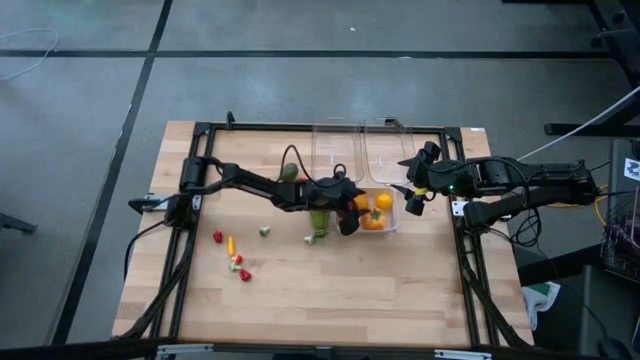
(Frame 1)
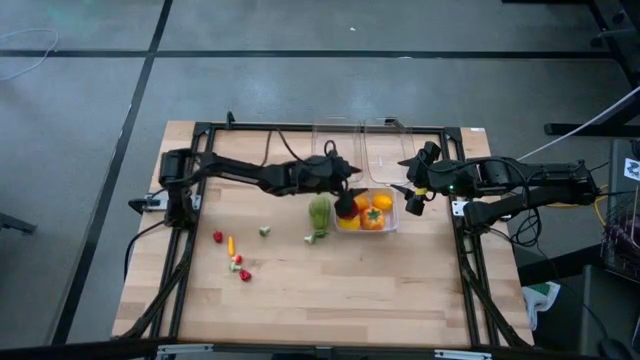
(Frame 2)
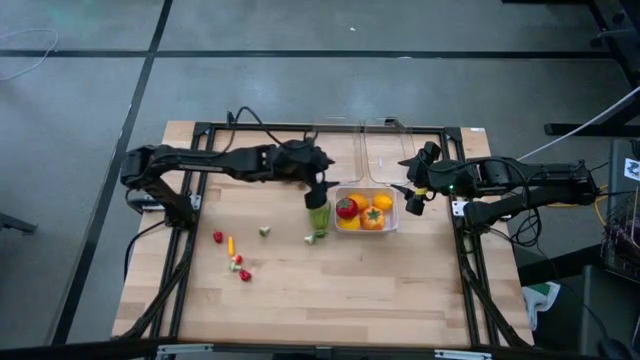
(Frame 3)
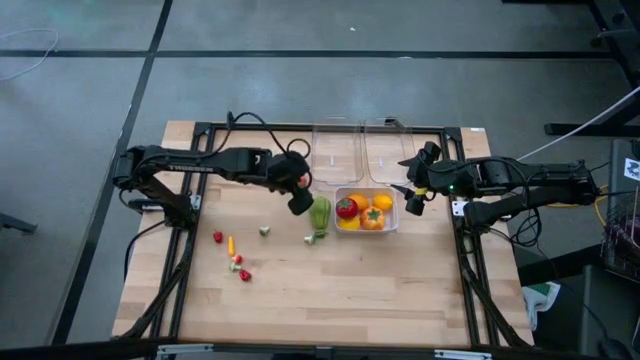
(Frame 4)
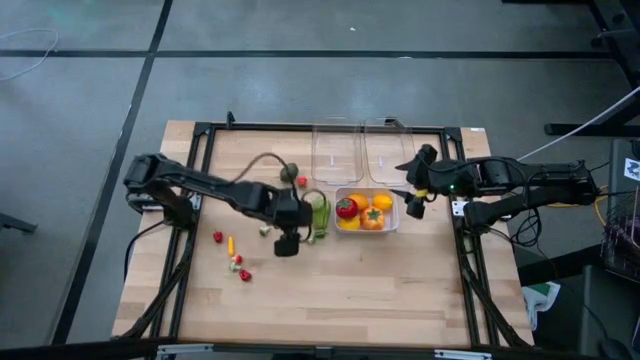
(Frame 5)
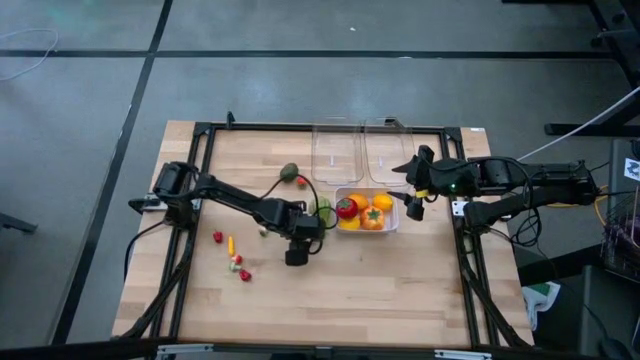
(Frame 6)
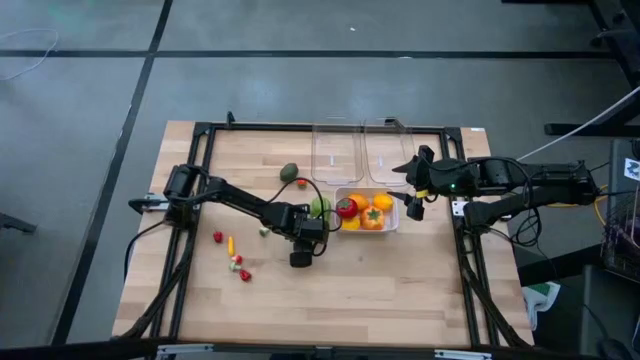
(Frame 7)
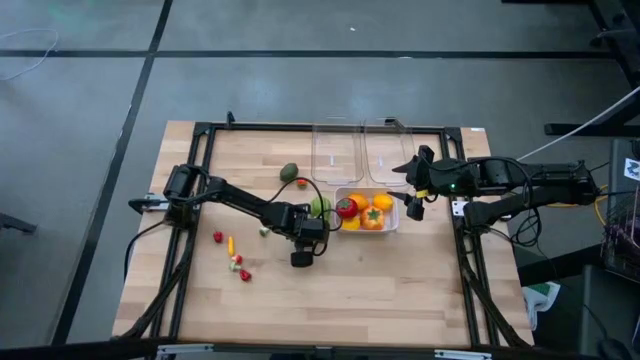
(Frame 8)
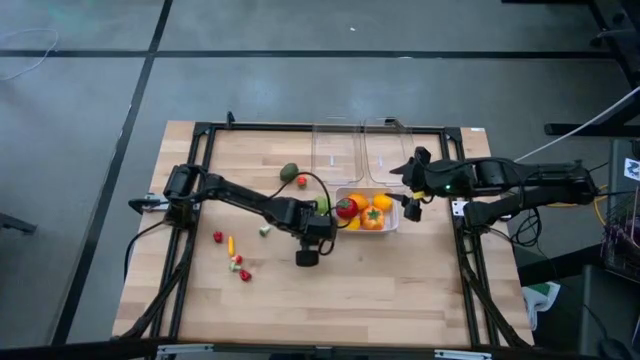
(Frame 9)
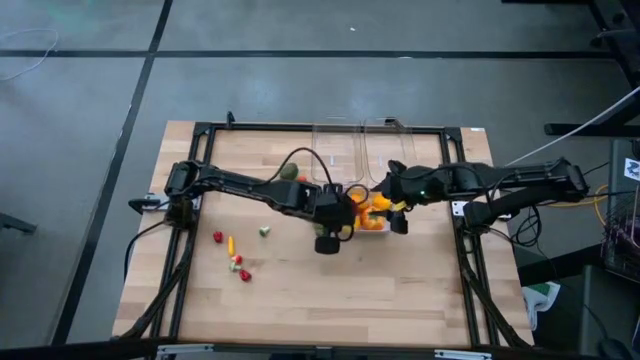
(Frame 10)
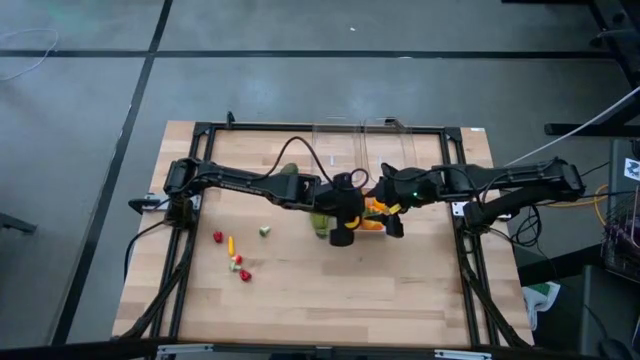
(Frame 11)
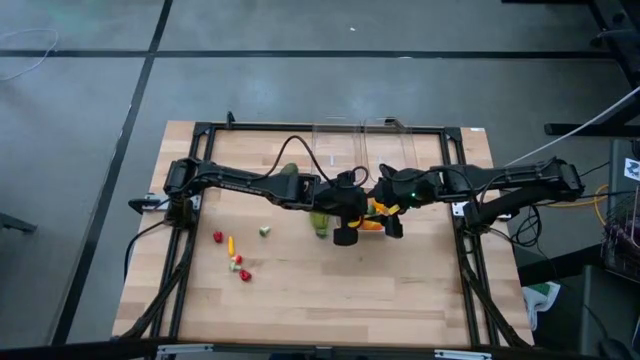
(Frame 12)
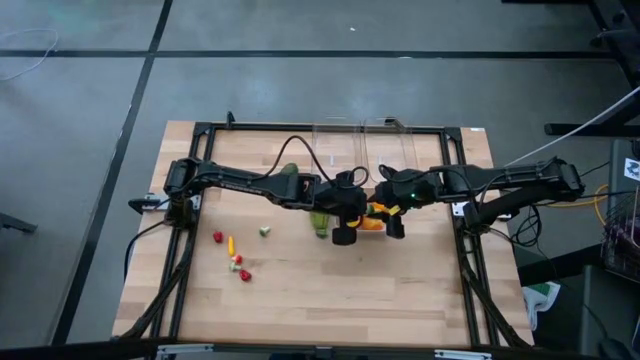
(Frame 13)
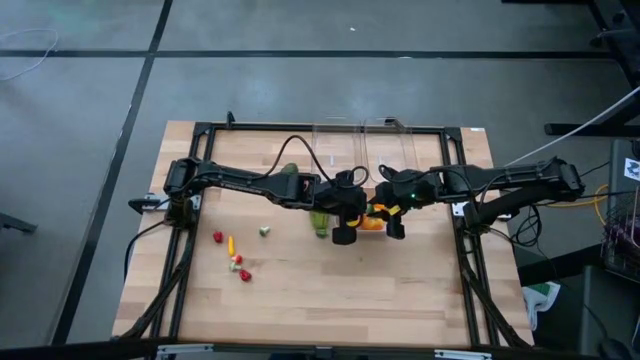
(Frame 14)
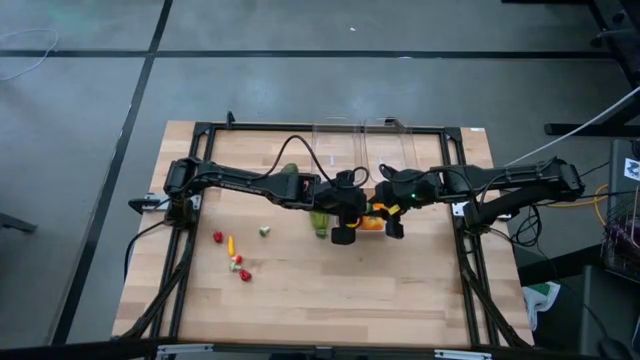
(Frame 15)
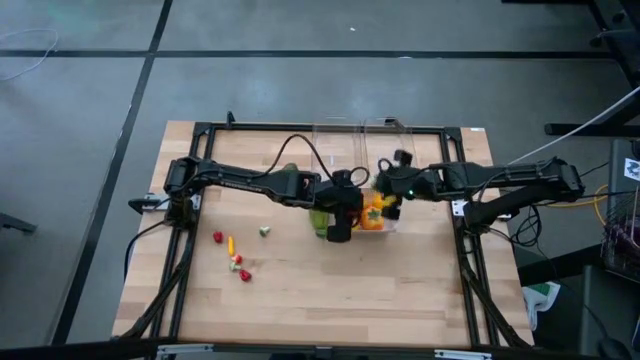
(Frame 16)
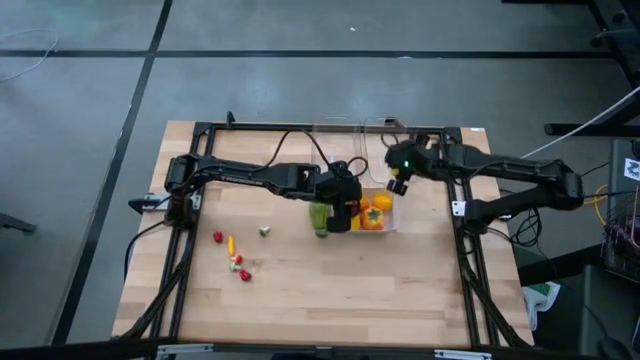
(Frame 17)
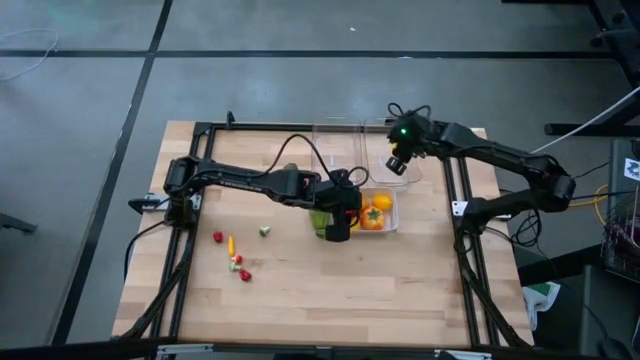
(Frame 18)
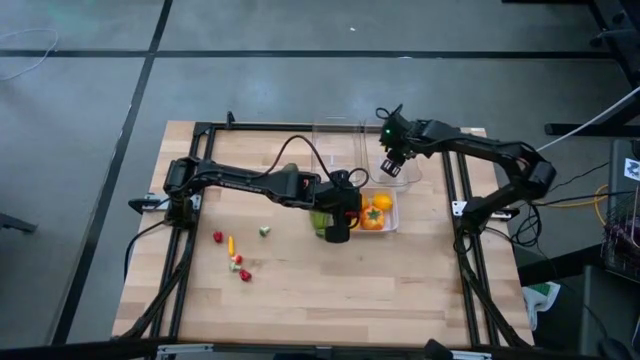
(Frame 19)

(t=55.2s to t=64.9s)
Task: Sort produce into baskets
Put the top right green mushroom into the right transparent bin

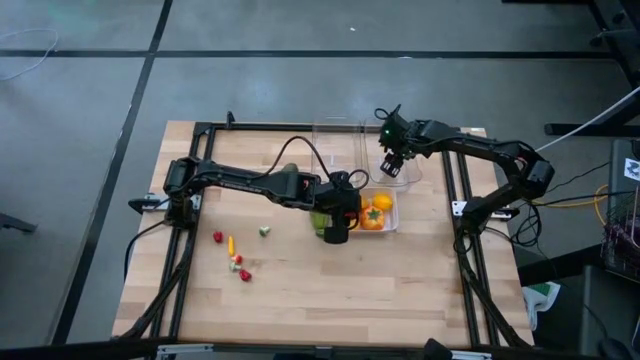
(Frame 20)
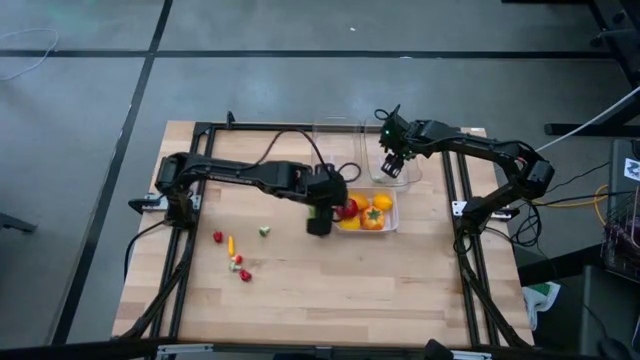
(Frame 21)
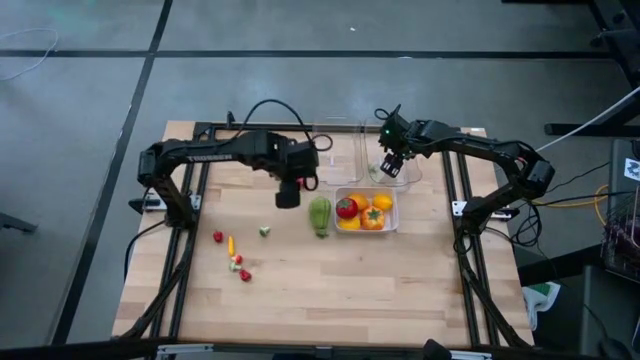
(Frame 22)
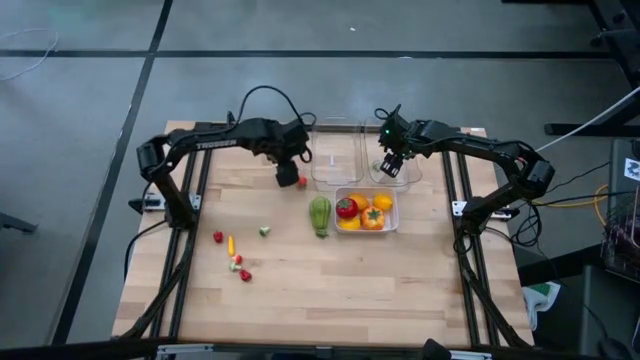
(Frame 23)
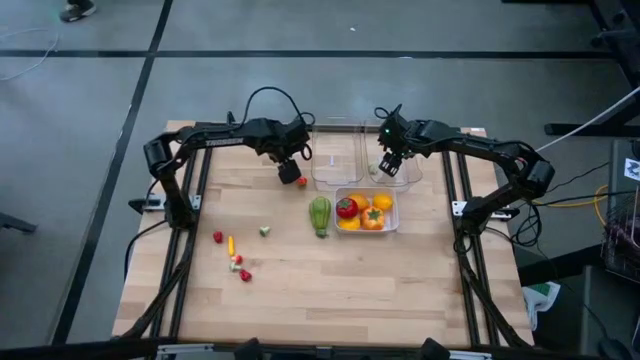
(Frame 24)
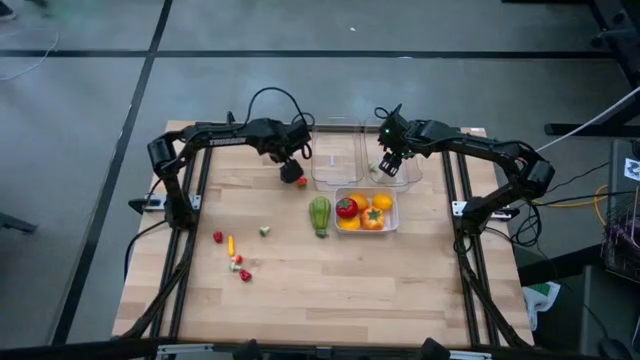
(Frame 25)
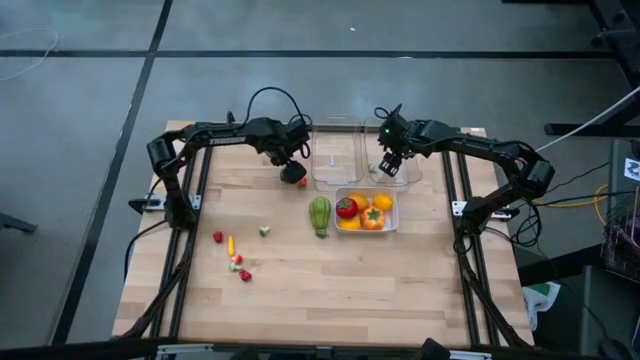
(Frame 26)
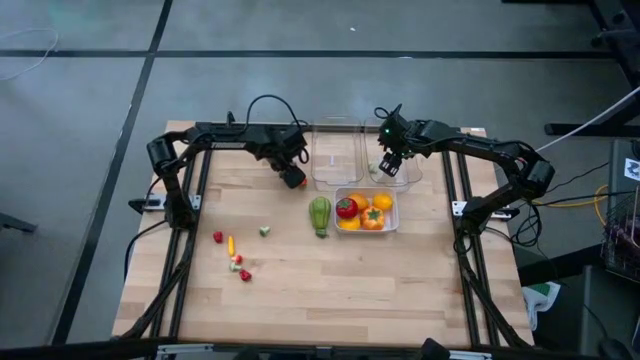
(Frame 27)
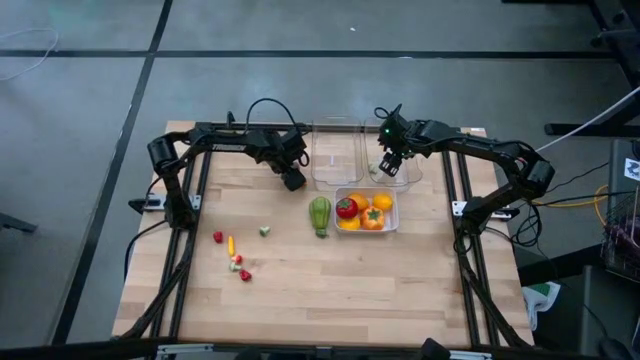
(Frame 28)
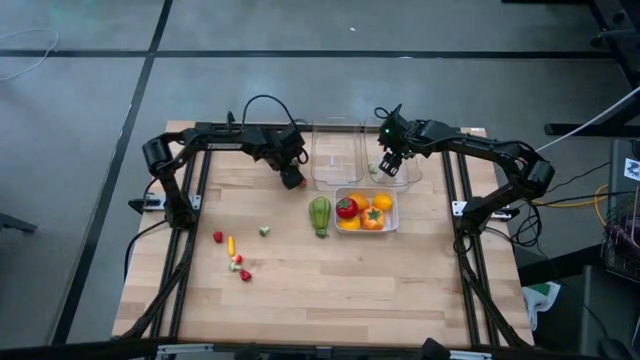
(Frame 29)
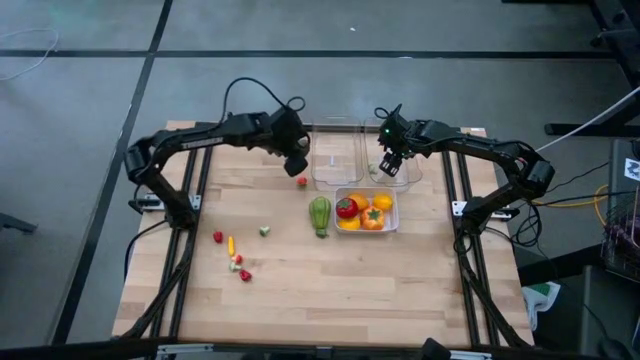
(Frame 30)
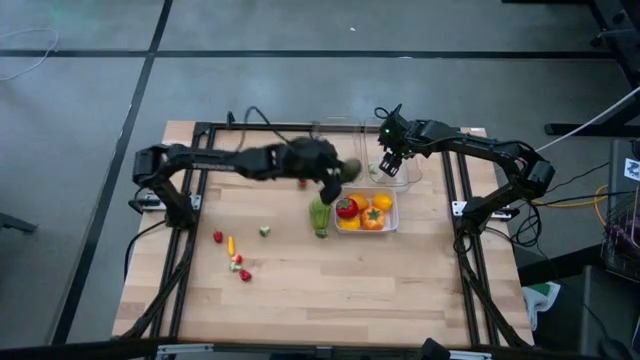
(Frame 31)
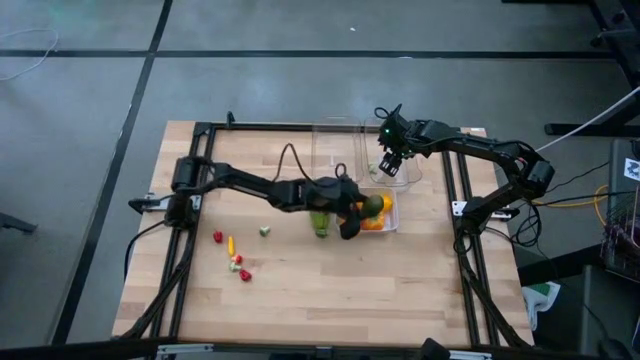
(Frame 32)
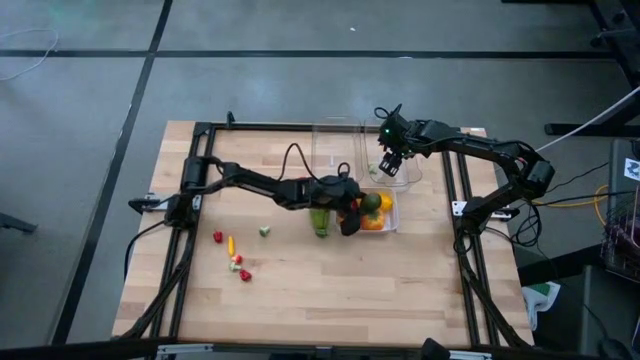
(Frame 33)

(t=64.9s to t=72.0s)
Put the lime into the white bin

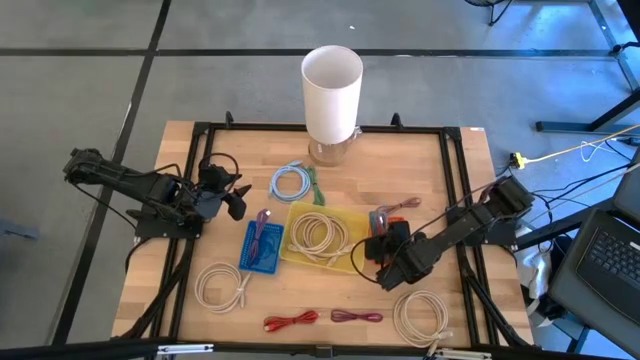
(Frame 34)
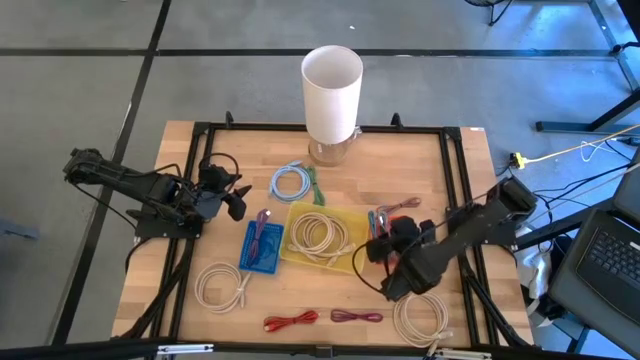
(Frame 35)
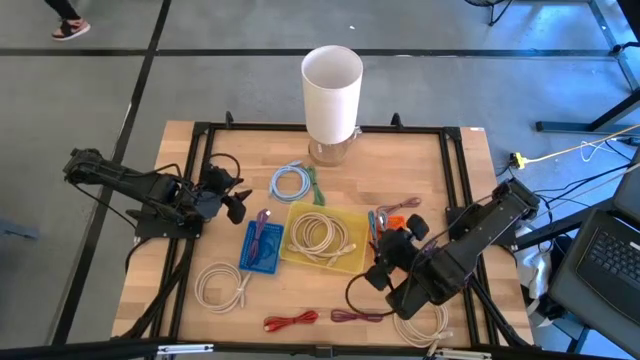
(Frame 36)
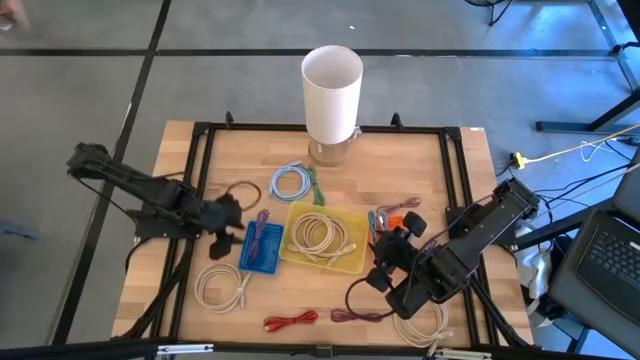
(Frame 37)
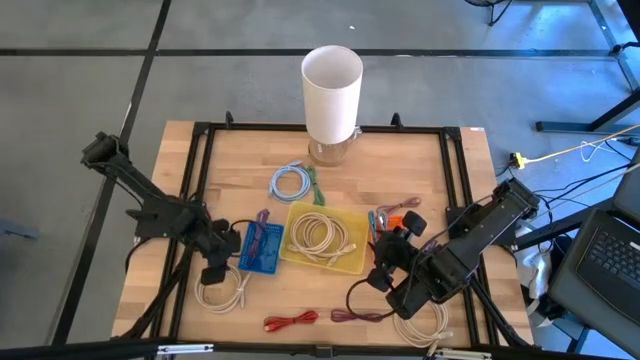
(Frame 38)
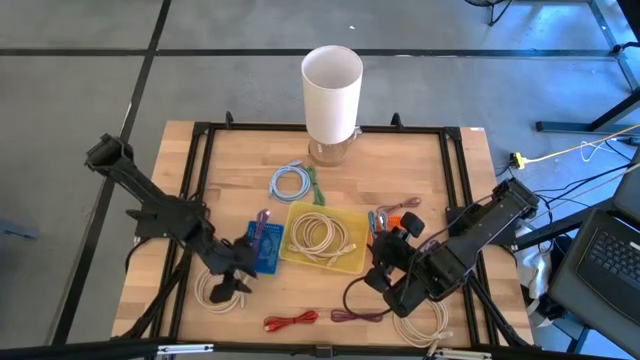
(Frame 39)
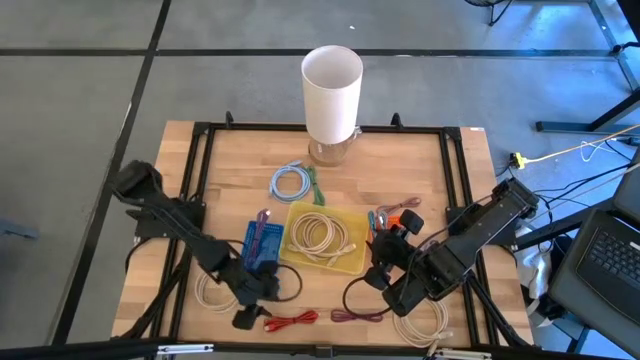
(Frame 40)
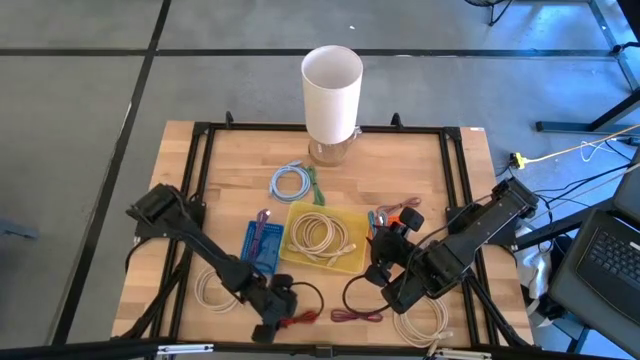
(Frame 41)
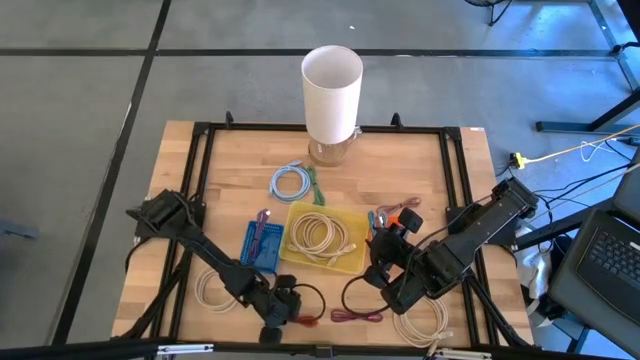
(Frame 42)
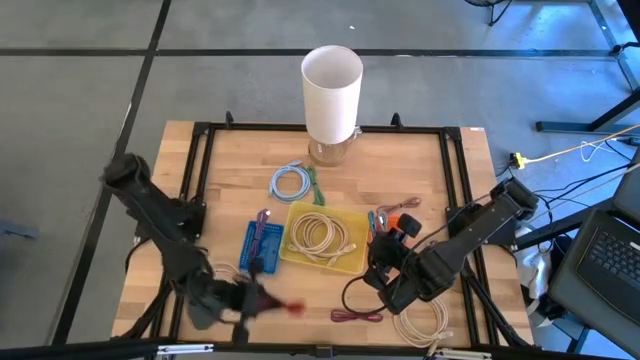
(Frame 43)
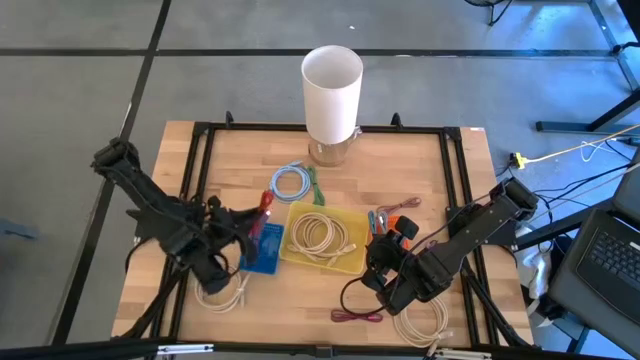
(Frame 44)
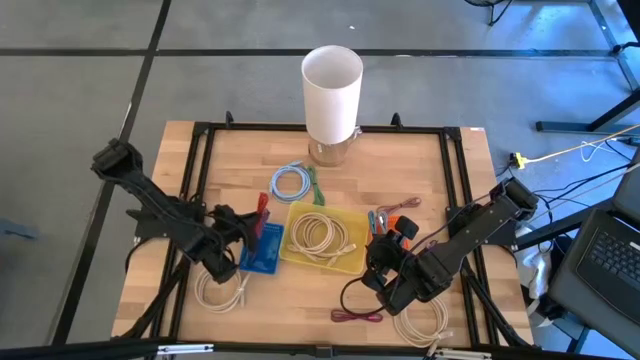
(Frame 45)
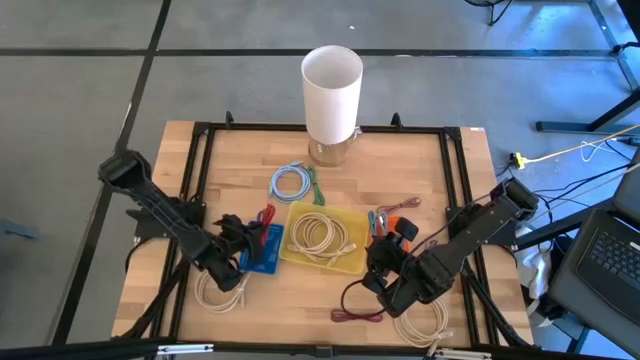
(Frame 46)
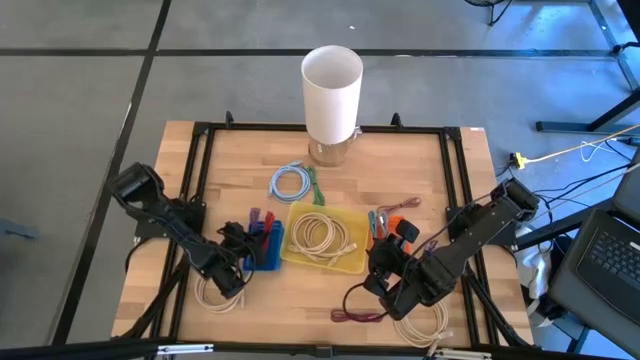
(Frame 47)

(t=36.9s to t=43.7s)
Task: Pick & Place USB Port
Put the orange charger cable into the blue bin
